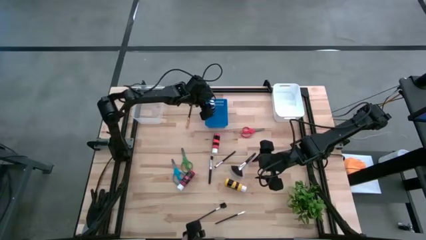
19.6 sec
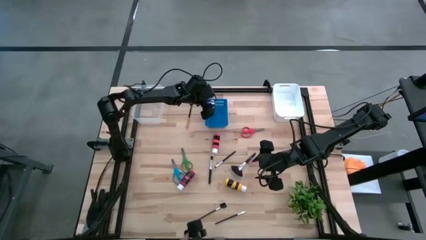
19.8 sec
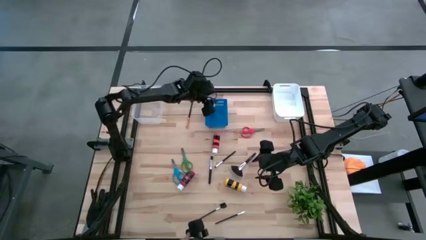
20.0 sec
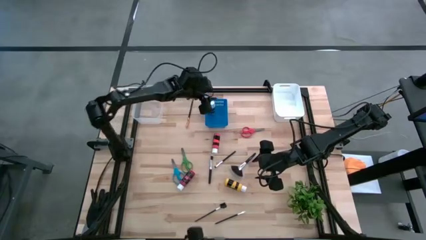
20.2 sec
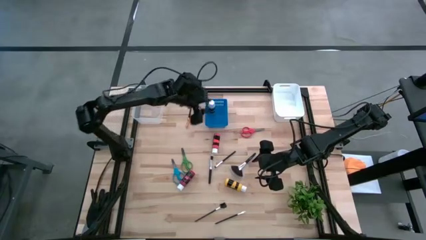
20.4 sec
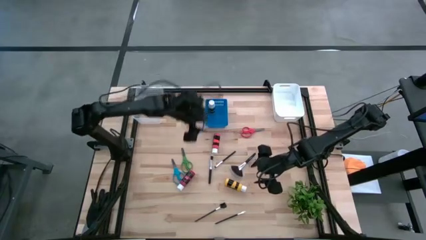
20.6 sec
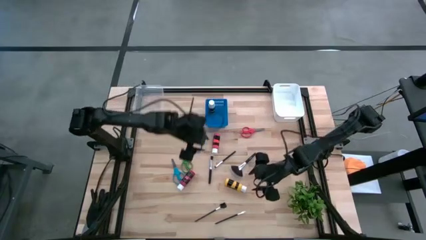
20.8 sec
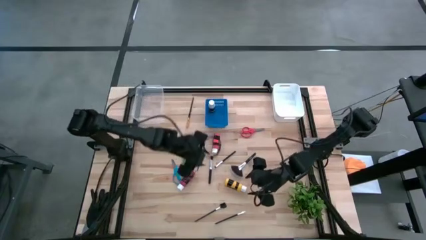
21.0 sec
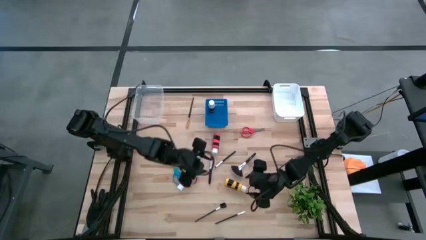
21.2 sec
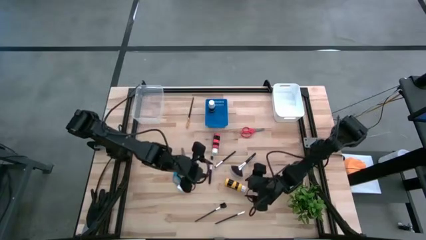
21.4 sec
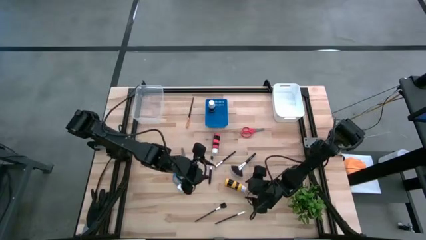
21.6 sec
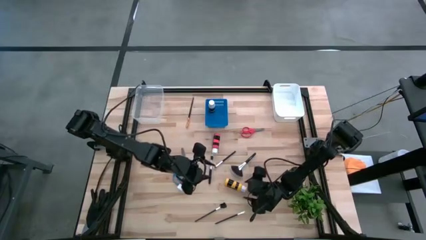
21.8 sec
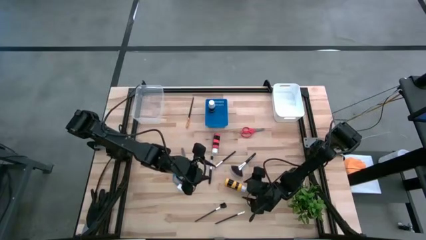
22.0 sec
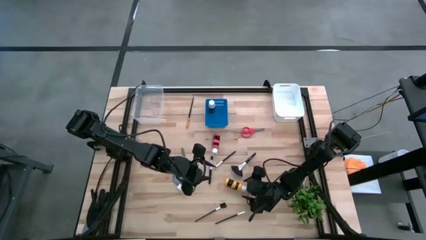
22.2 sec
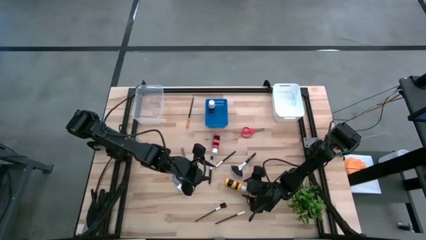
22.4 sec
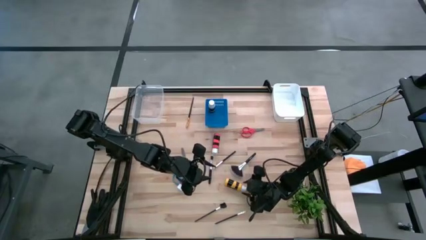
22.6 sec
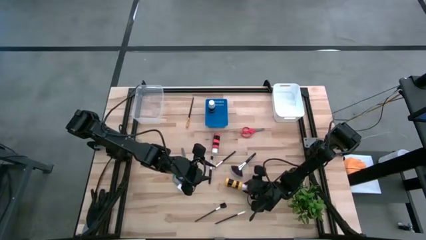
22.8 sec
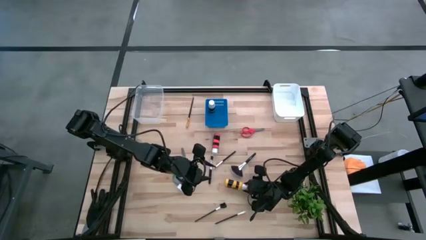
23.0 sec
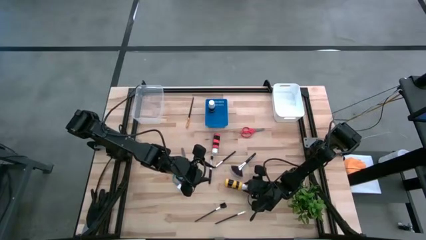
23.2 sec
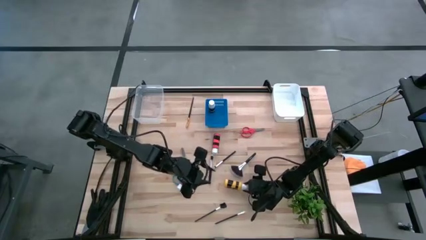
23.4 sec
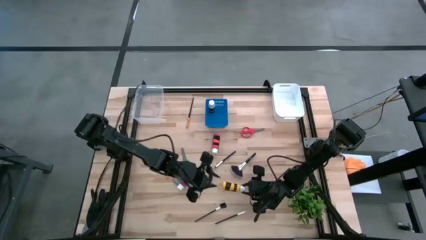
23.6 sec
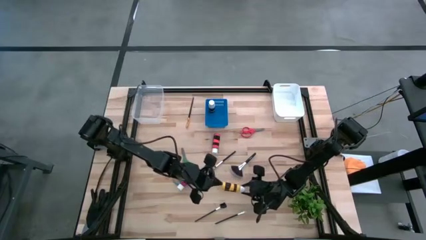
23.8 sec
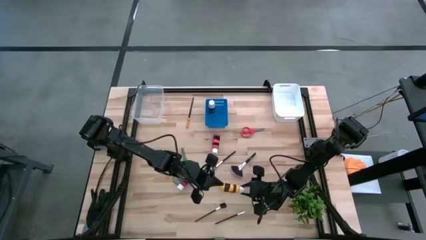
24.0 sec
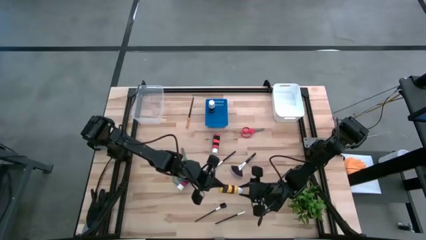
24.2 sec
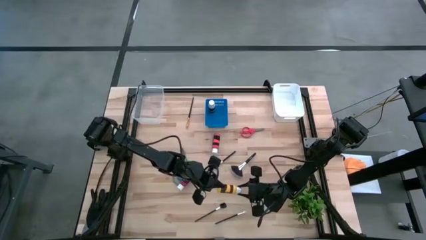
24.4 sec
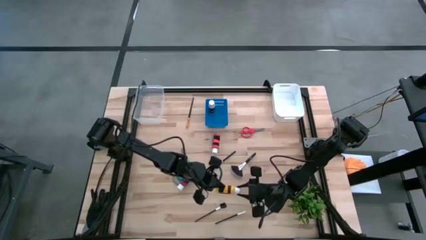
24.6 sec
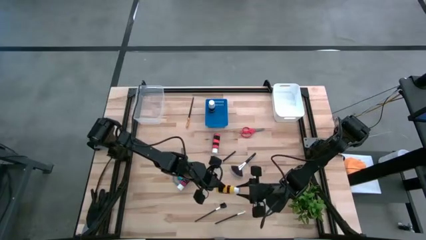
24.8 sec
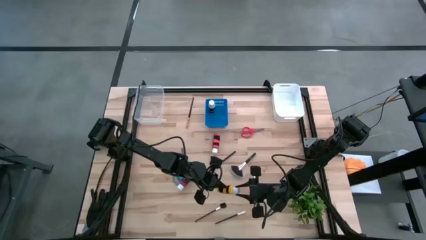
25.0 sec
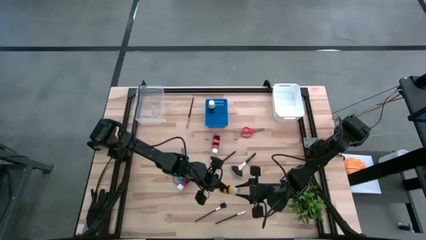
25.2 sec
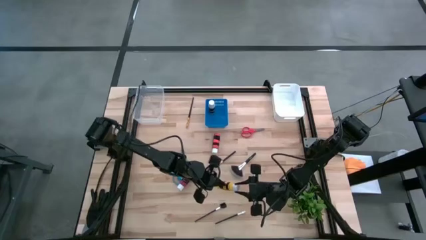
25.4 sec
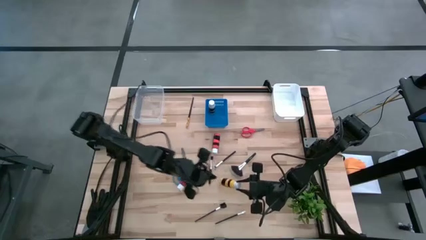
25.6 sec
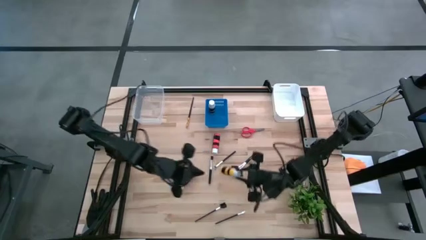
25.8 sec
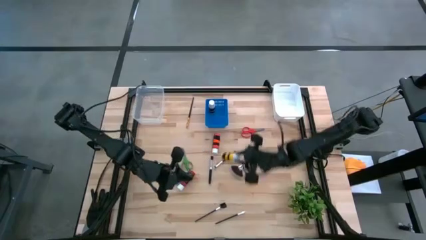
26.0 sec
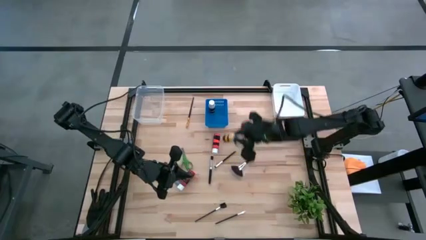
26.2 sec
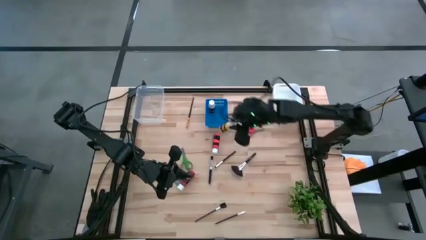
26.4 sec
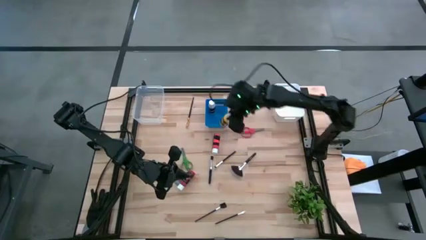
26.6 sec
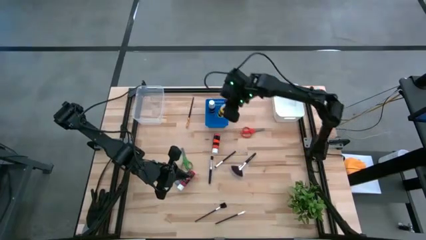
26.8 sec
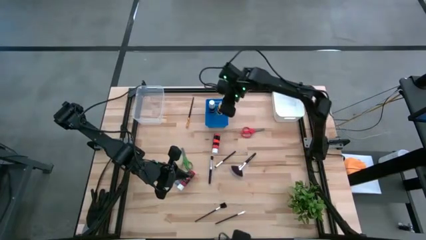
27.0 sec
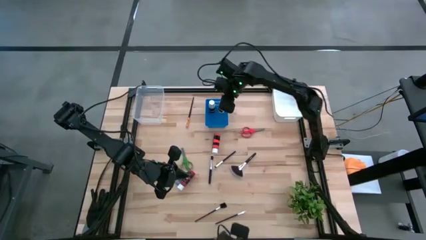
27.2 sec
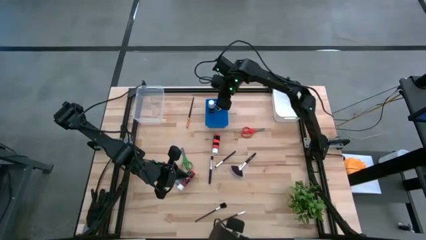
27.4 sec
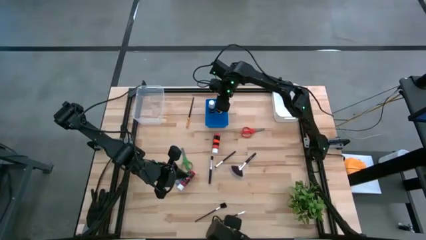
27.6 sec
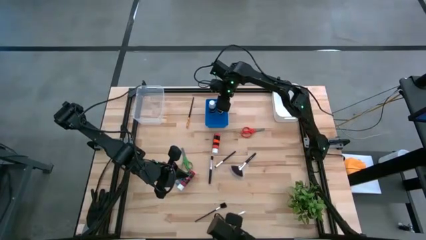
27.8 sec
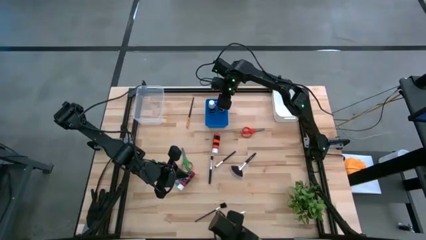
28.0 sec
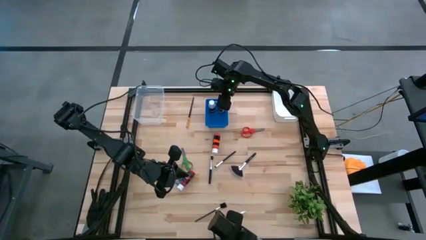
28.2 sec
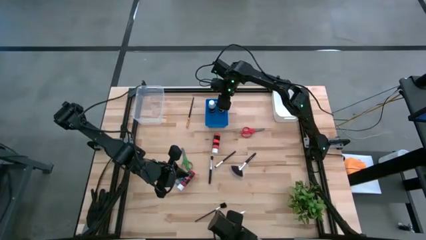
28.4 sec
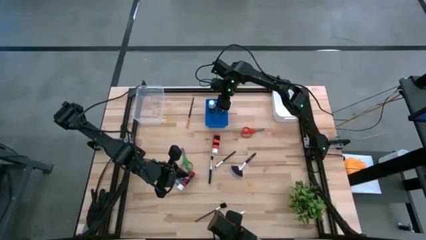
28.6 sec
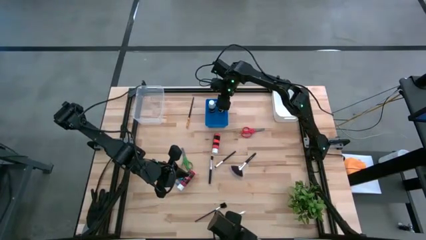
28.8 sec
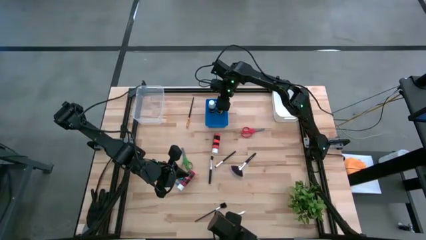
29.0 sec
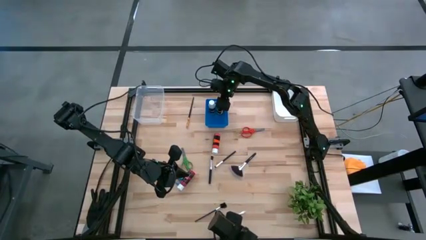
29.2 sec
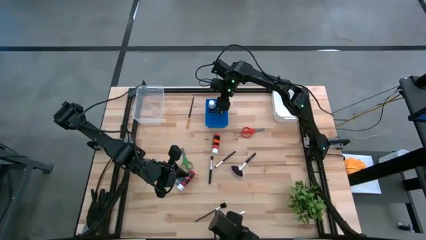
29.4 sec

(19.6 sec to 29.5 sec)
Task: Pick & Place Paint Supplies
Put the yellow paint bottle into the blue bin

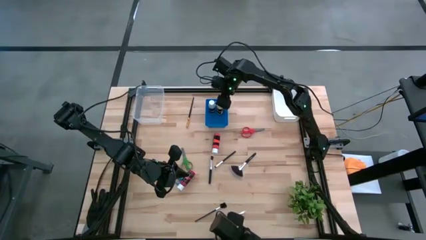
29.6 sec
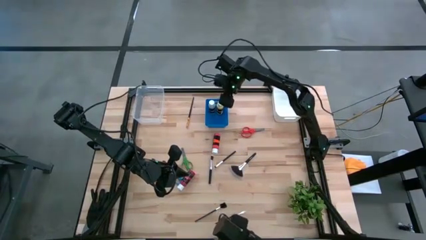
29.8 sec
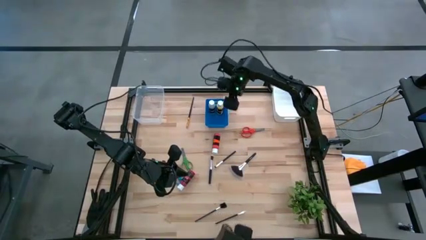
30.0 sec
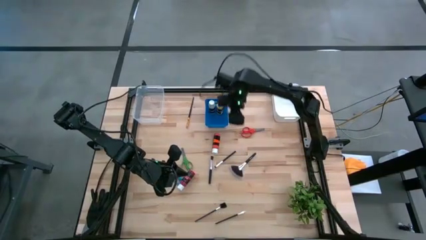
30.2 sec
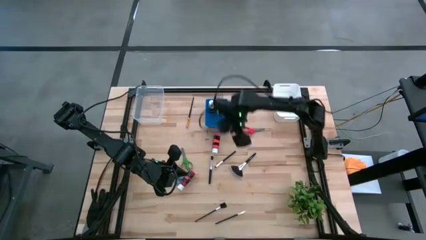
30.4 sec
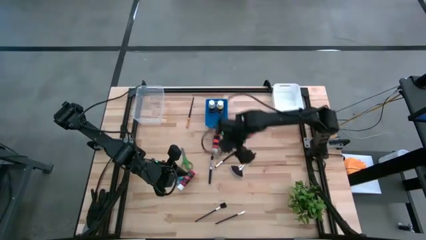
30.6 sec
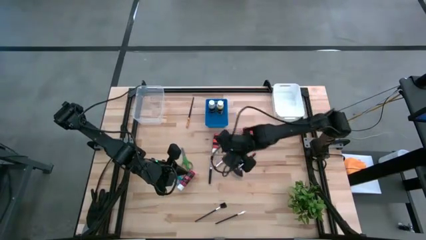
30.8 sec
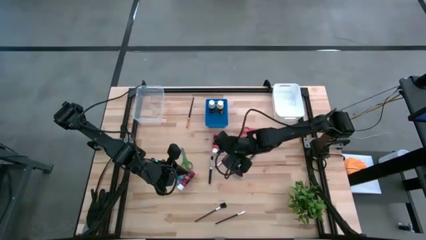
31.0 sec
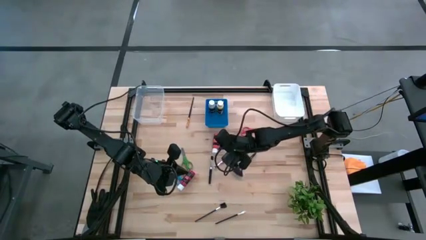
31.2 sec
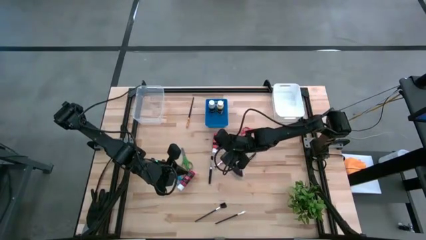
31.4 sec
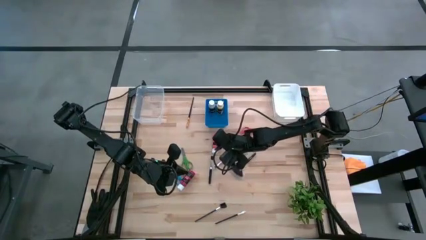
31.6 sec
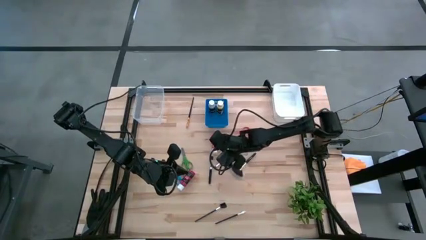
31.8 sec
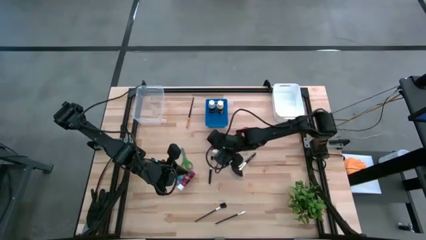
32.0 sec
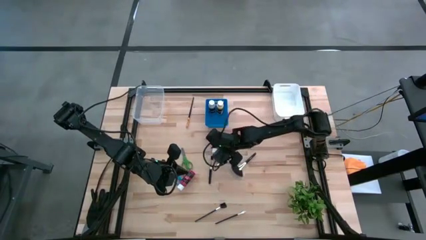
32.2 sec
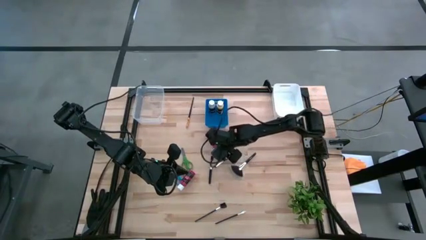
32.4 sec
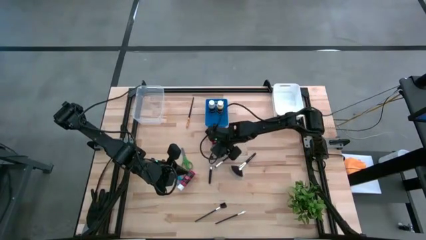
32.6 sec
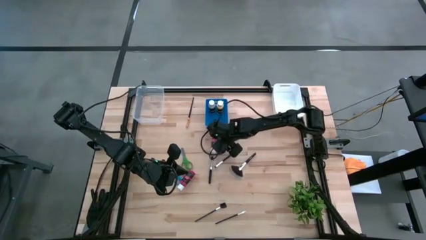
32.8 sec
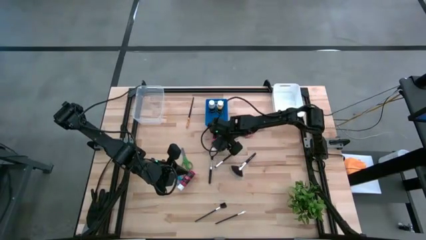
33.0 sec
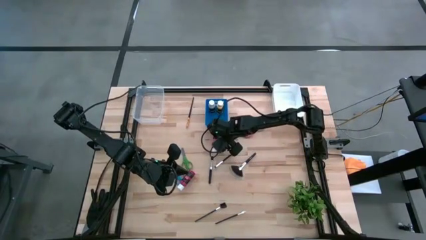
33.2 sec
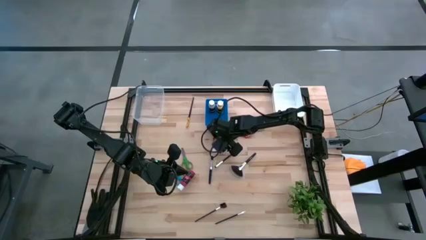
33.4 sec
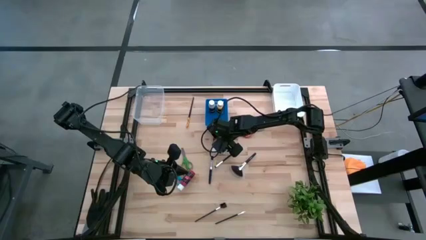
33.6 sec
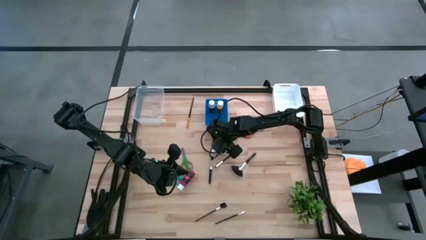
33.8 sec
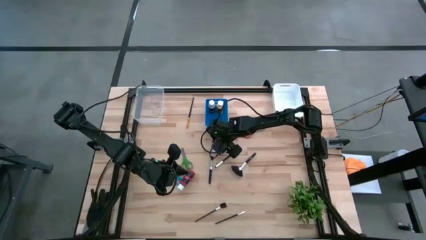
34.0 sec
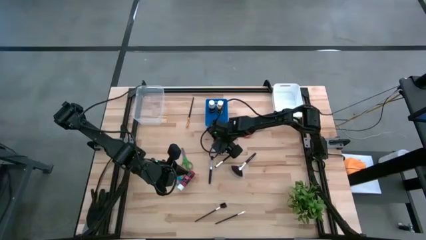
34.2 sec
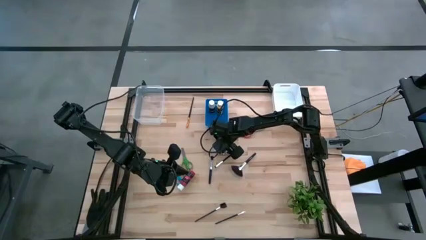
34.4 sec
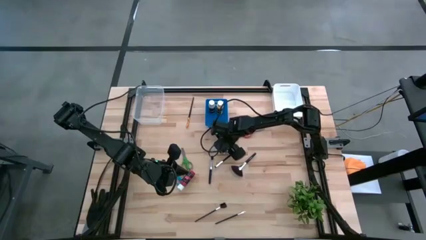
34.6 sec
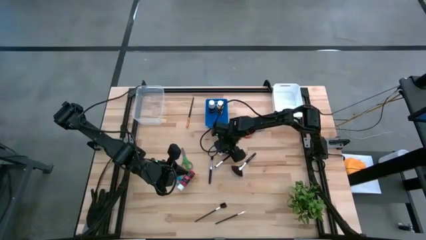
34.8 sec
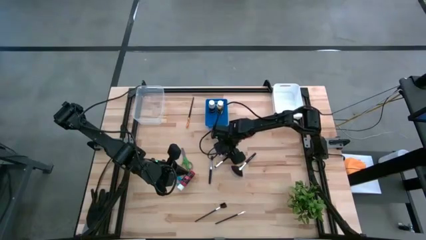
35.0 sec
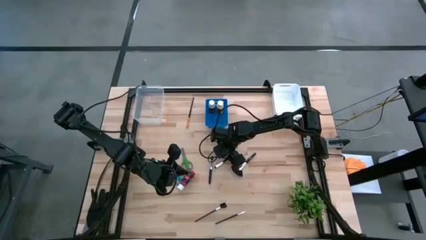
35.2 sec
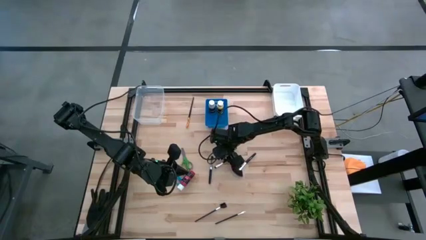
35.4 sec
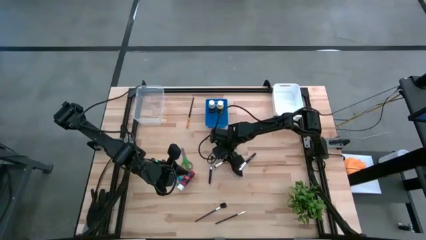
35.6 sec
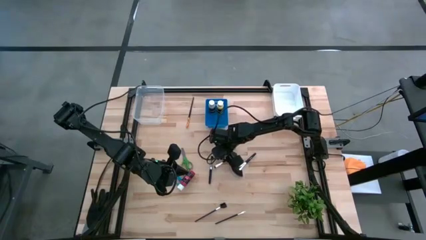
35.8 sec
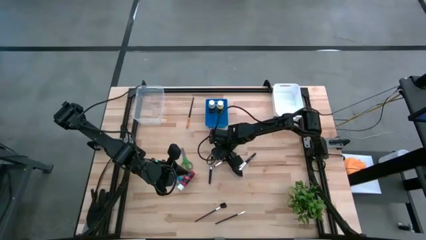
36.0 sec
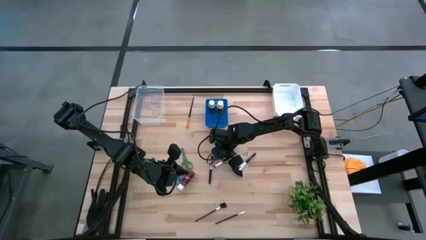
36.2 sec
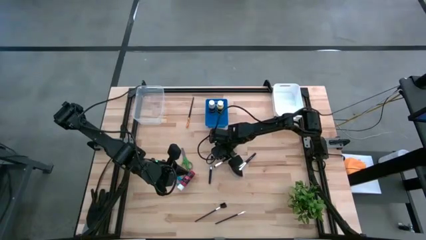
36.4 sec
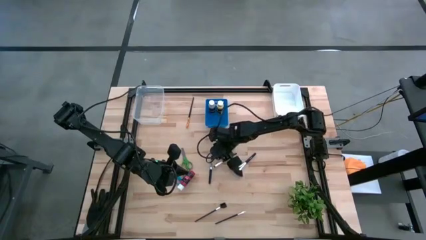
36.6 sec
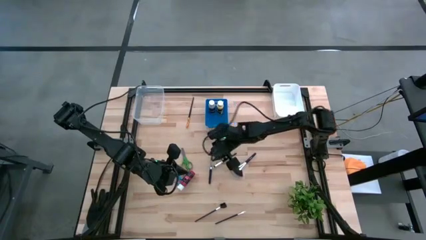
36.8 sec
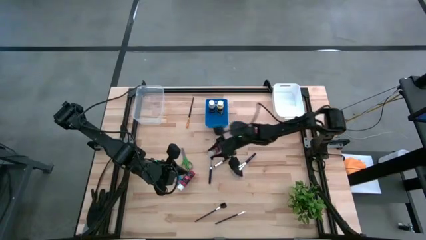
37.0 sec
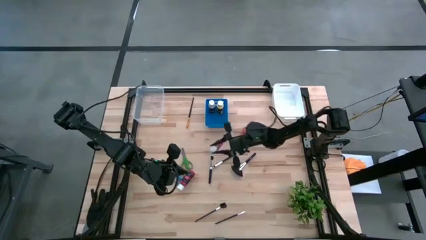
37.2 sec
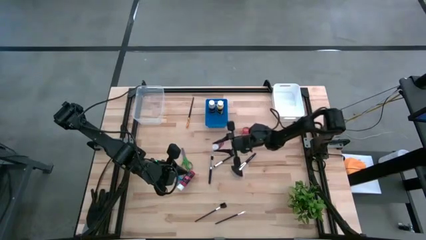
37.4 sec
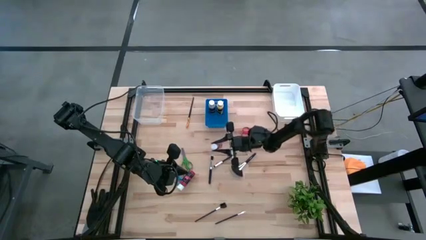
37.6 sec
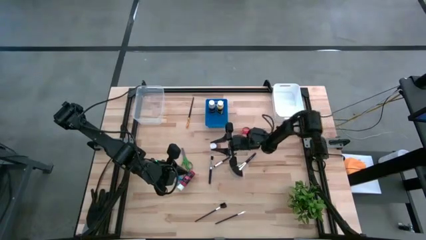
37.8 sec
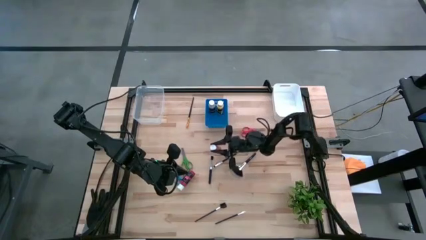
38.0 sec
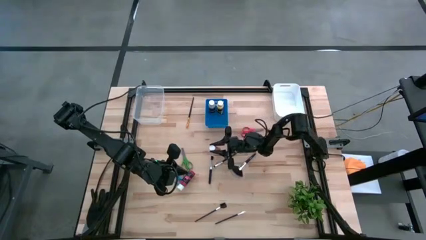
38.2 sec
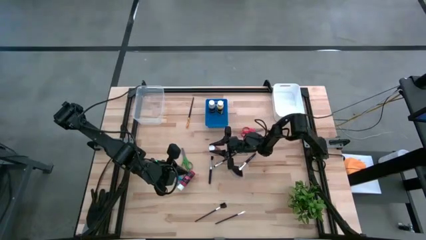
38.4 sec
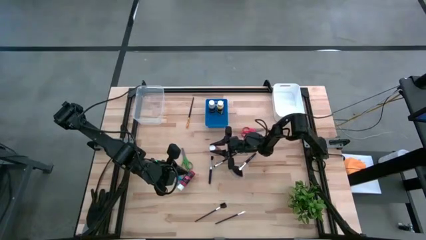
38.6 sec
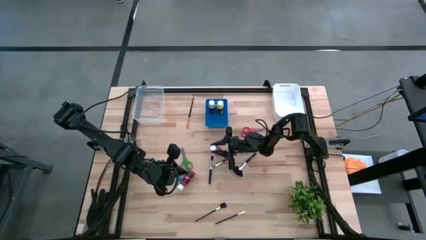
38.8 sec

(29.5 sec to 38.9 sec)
Put the orange paint bottle into the blue bin
